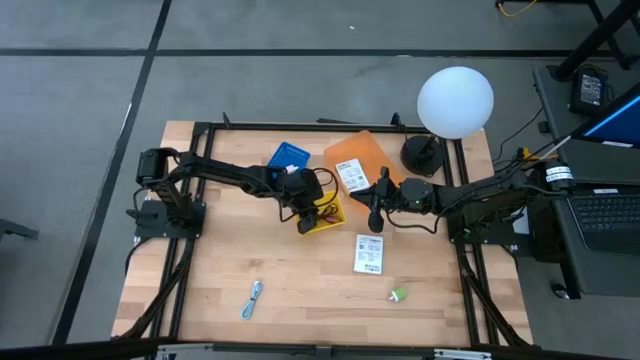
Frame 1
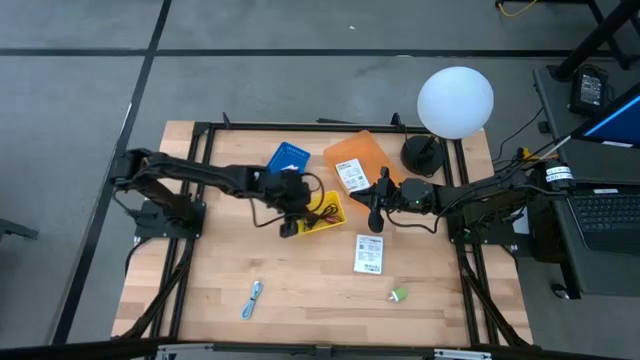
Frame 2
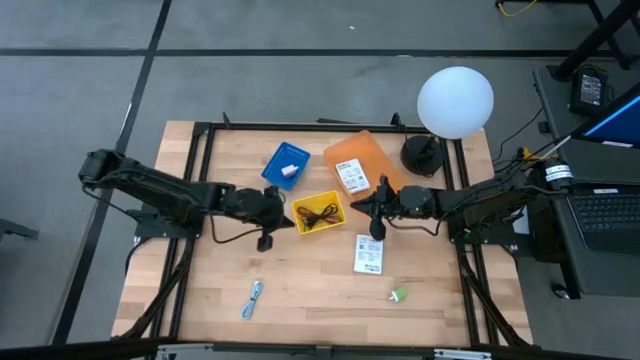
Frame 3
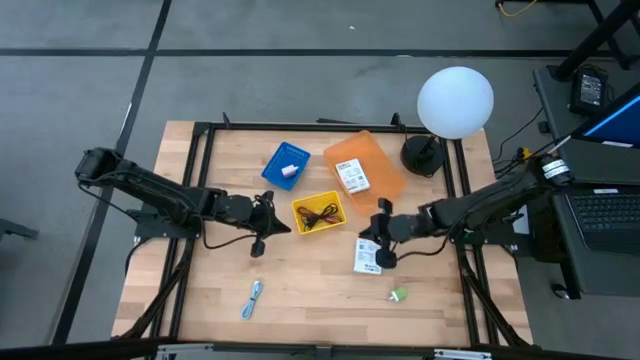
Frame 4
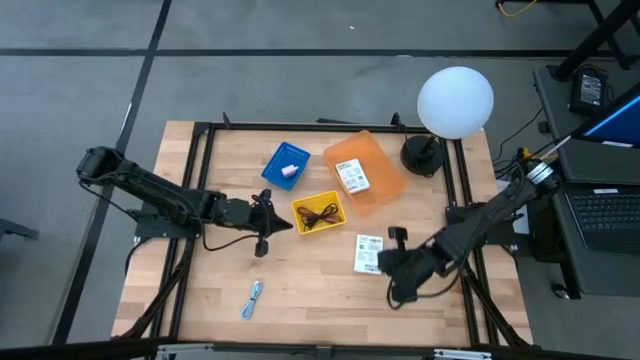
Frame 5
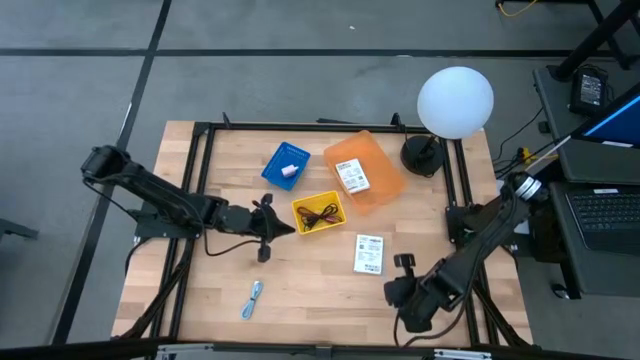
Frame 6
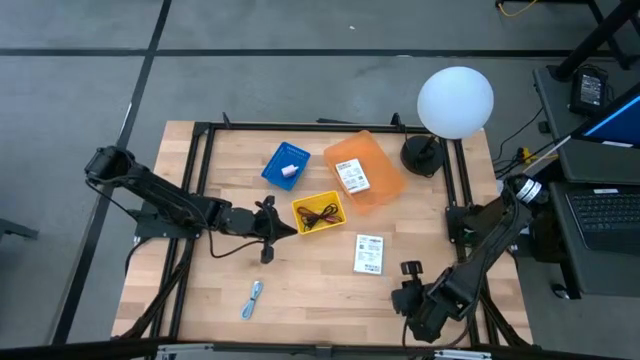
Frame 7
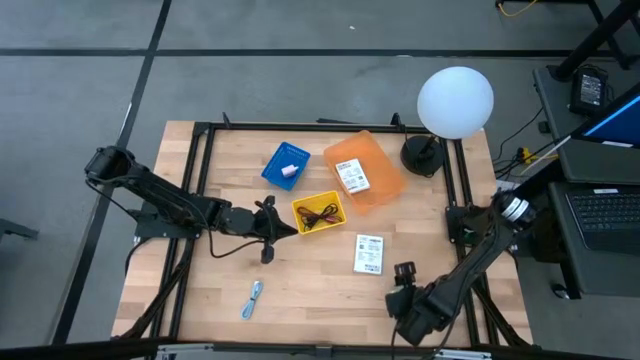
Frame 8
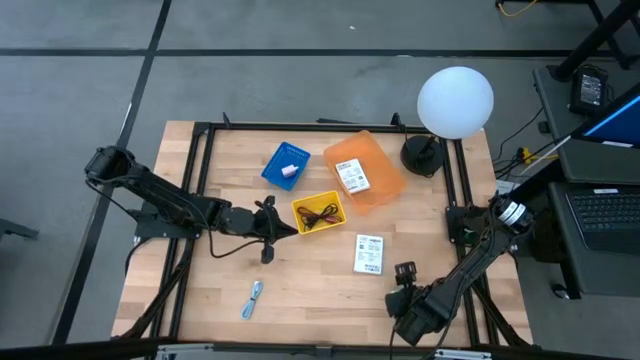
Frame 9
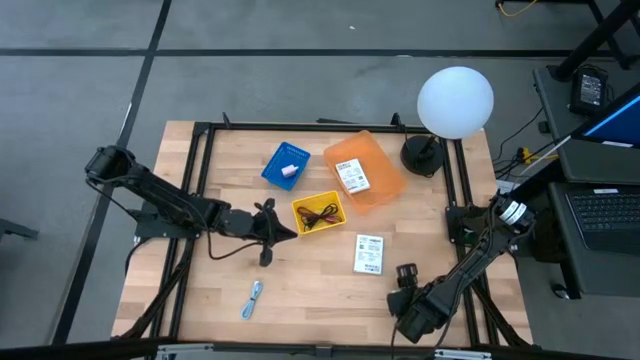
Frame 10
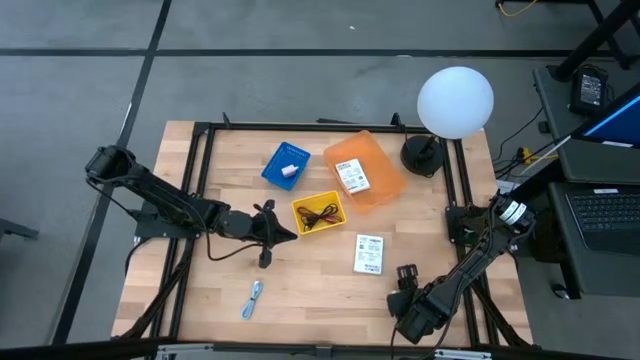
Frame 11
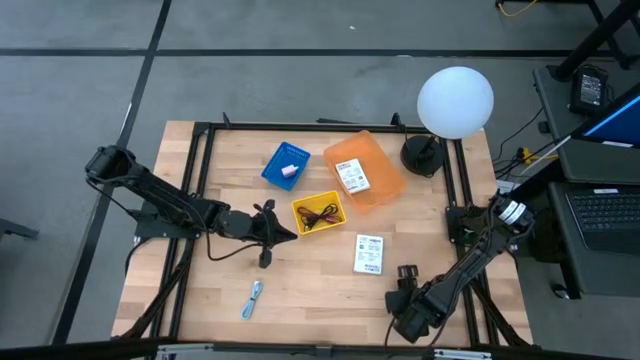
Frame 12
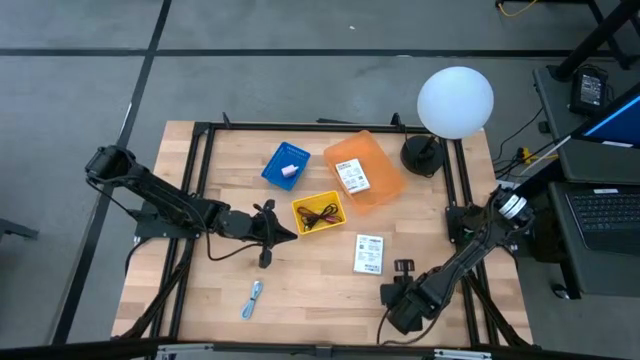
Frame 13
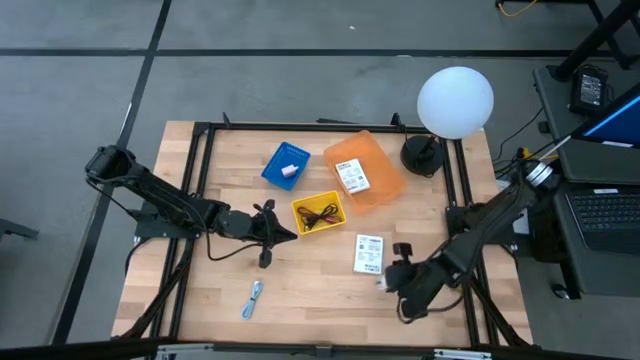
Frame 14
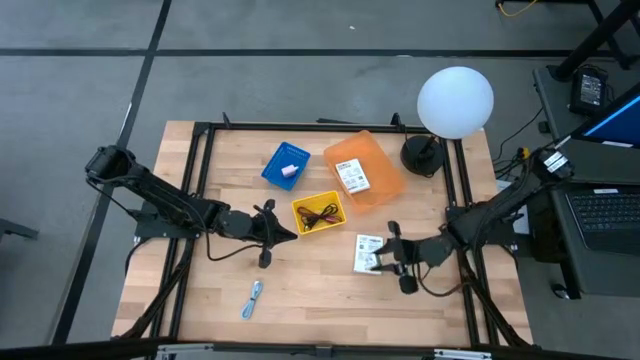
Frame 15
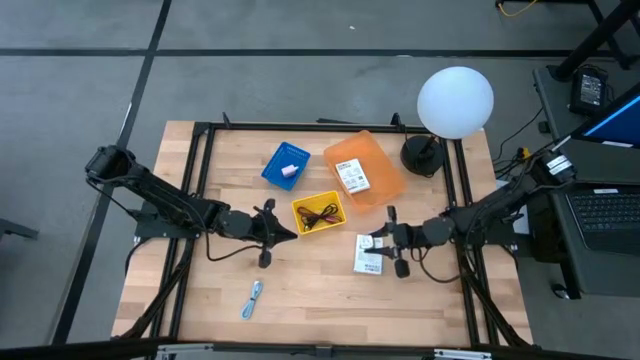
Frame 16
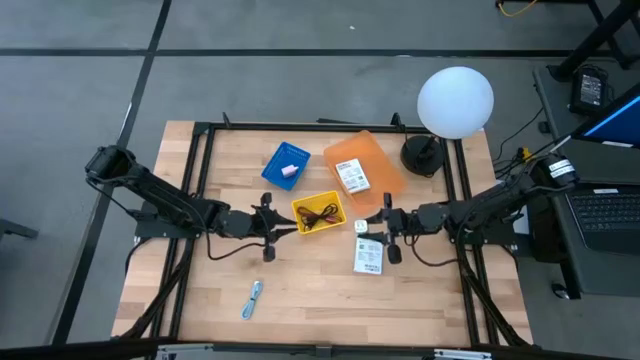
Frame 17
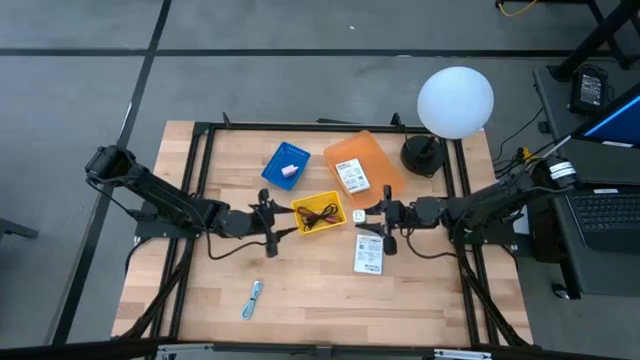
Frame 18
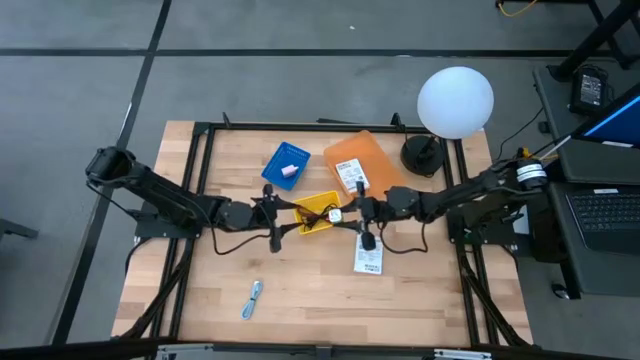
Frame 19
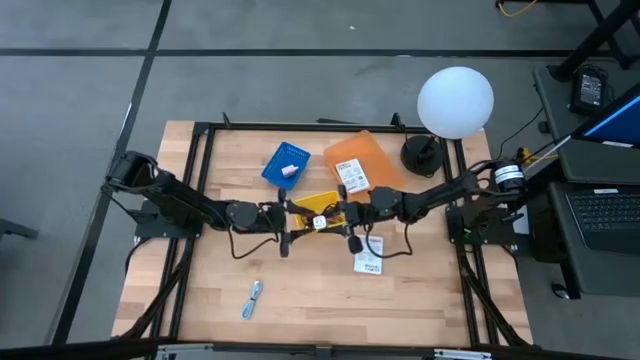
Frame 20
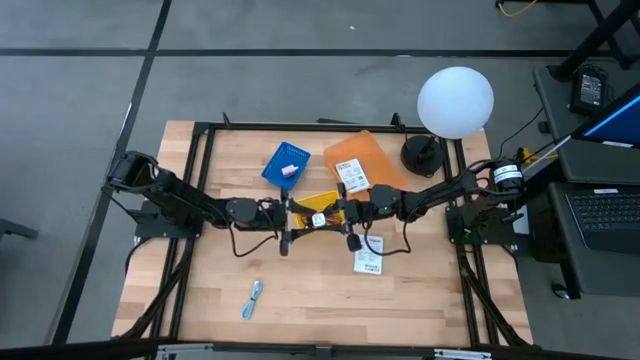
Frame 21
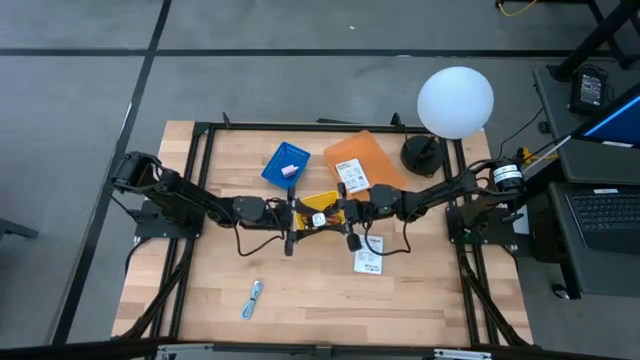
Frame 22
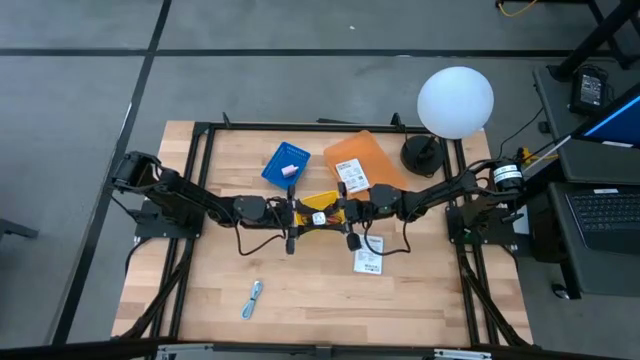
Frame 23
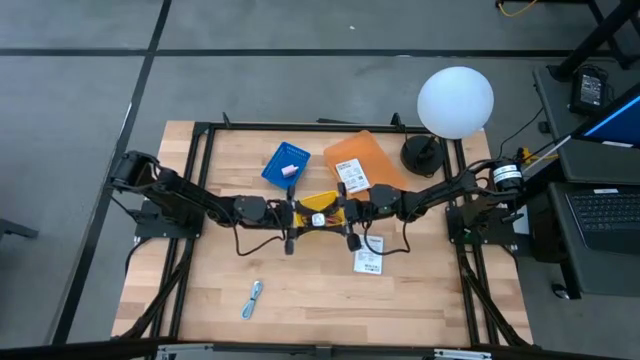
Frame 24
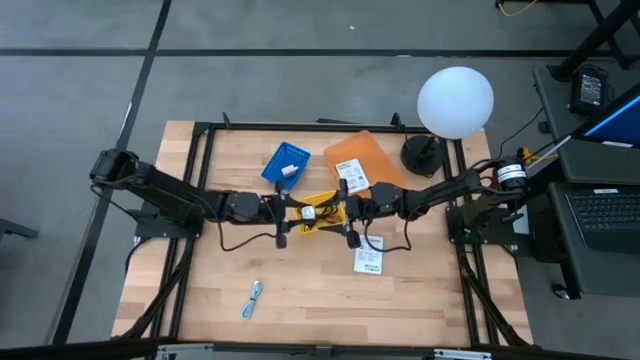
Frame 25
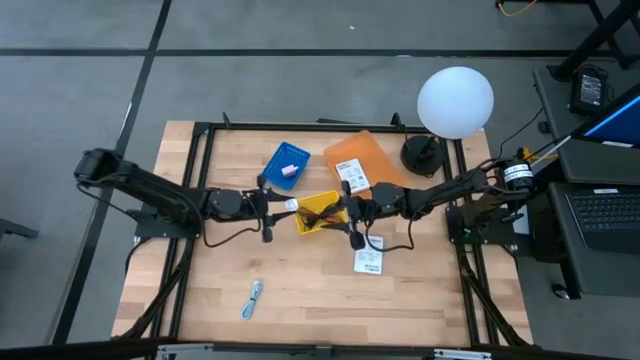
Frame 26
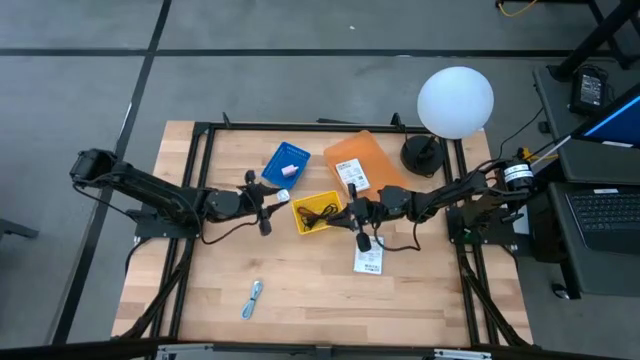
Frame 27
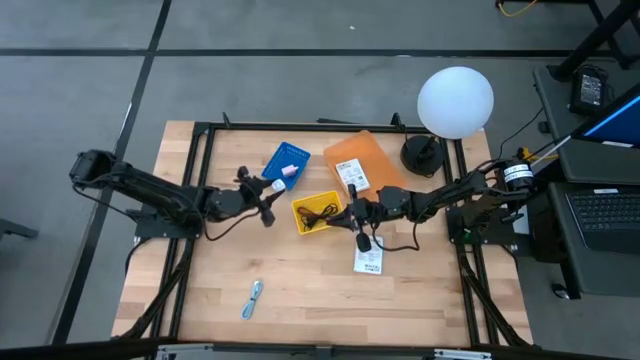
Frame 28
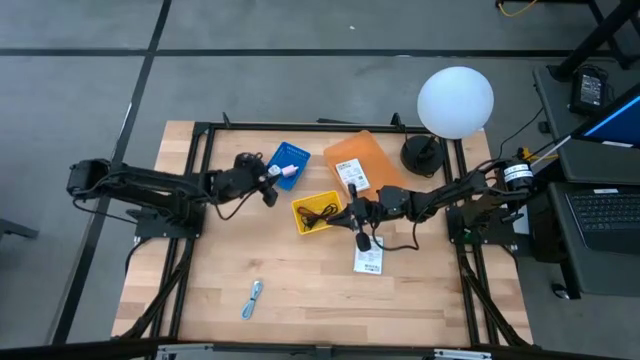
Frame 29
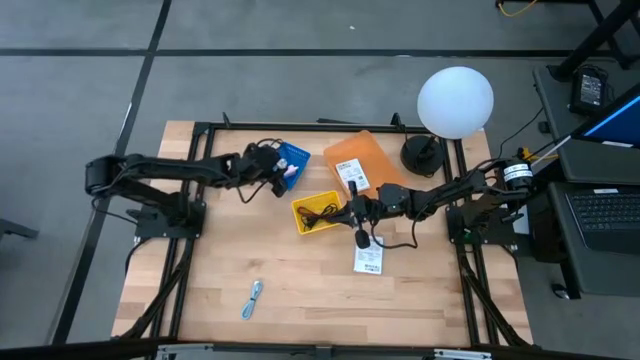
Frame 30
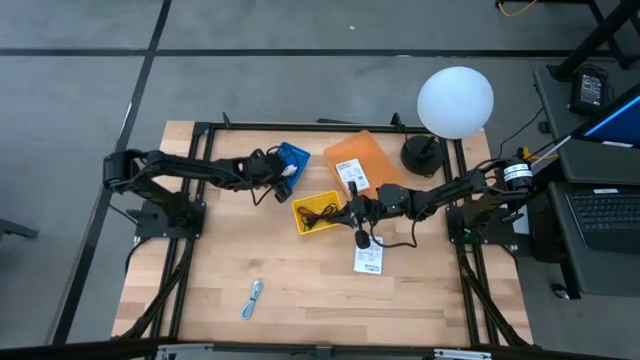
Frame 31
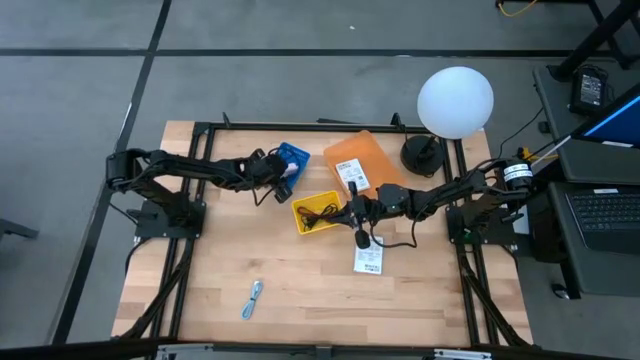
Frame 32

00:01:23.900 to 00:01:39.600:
Task: Pick and place items into bin
Put the green charger adapter into the blue bin
